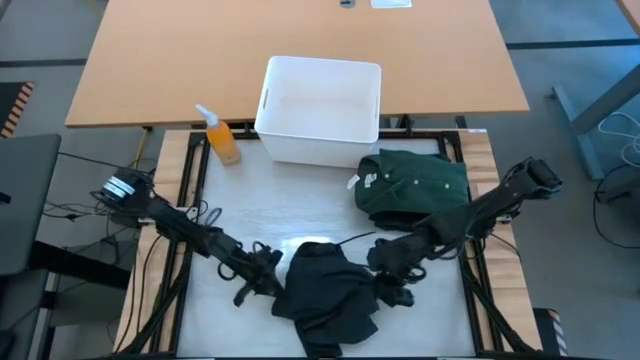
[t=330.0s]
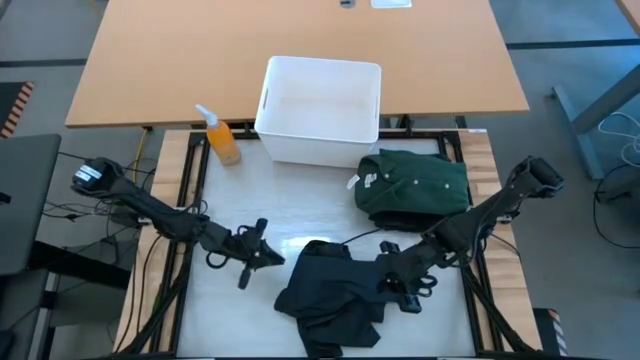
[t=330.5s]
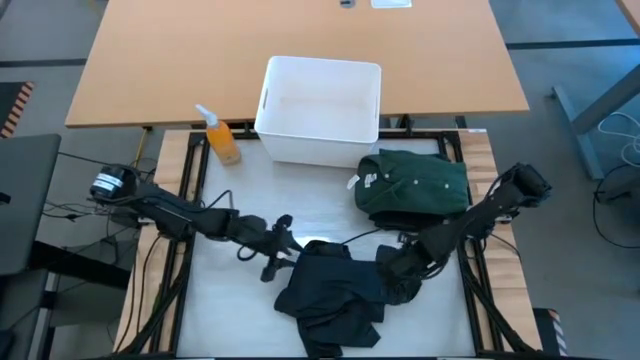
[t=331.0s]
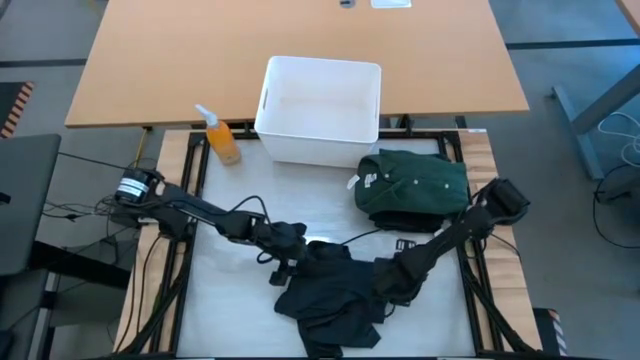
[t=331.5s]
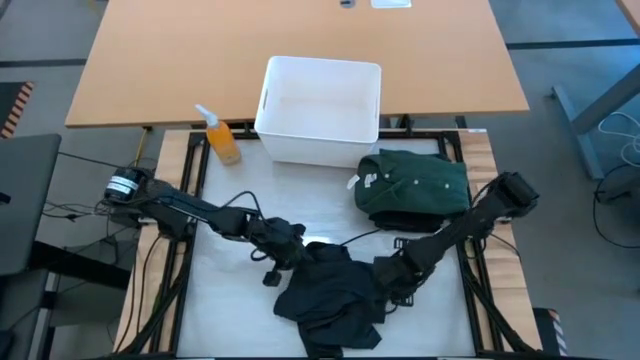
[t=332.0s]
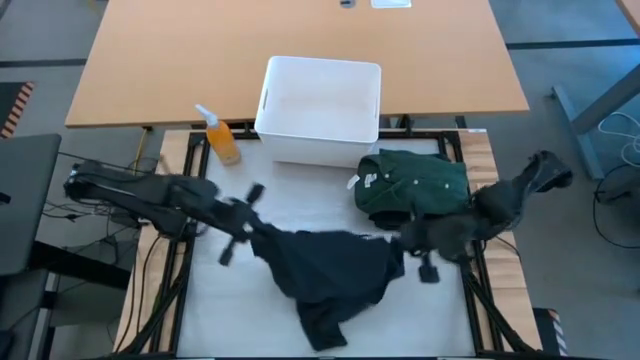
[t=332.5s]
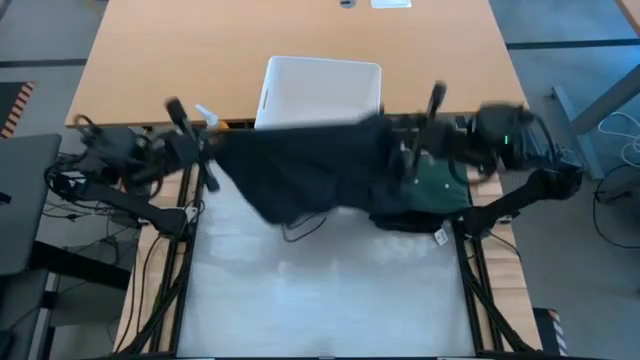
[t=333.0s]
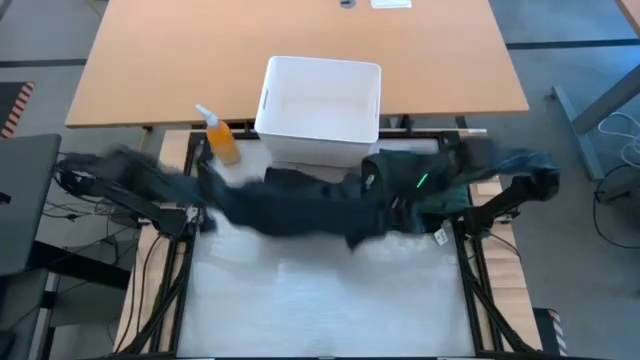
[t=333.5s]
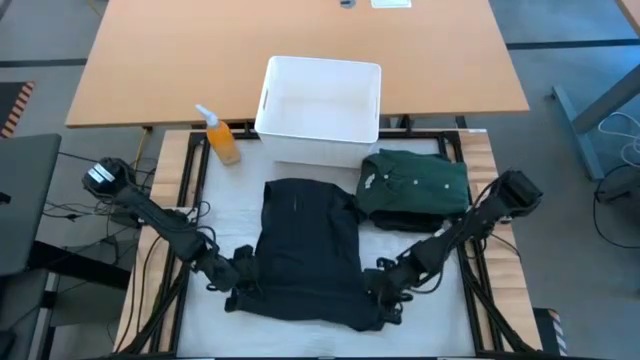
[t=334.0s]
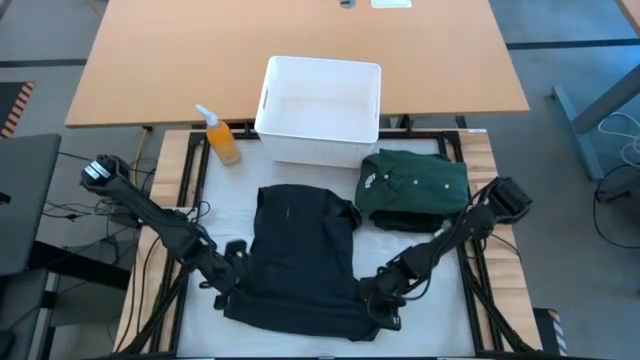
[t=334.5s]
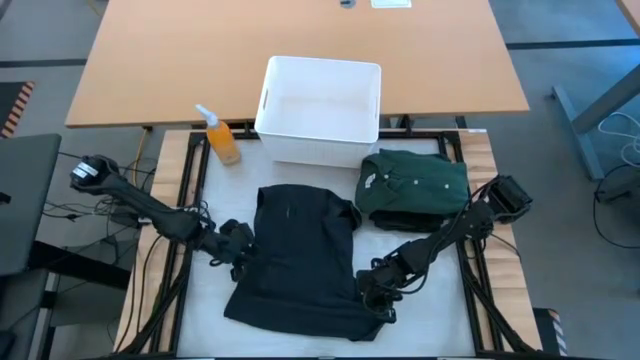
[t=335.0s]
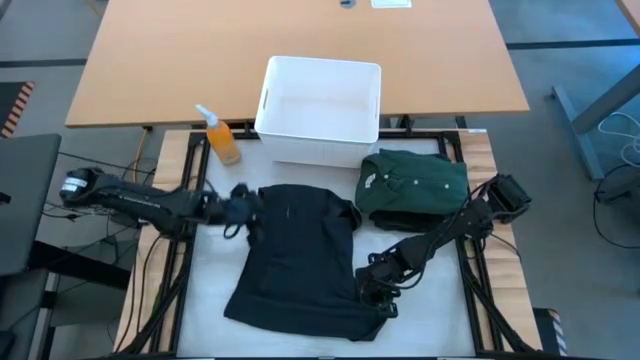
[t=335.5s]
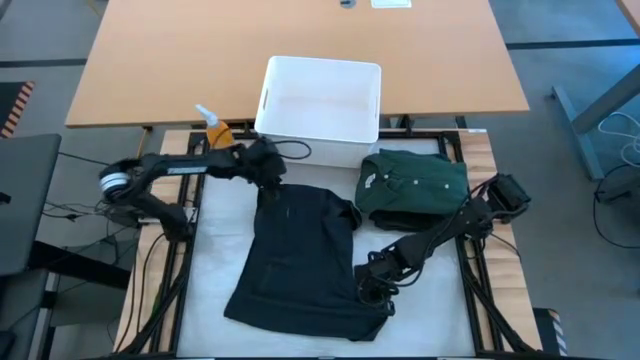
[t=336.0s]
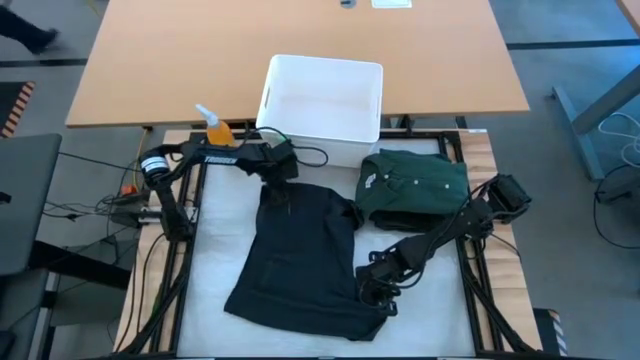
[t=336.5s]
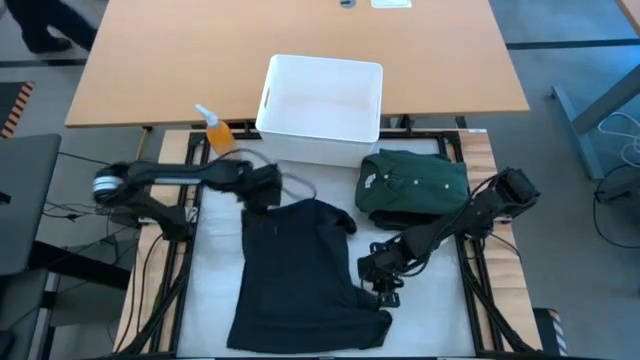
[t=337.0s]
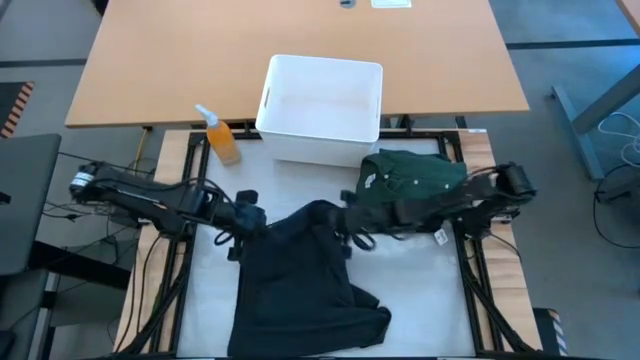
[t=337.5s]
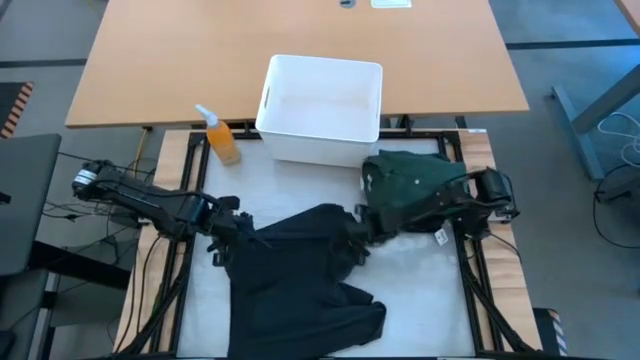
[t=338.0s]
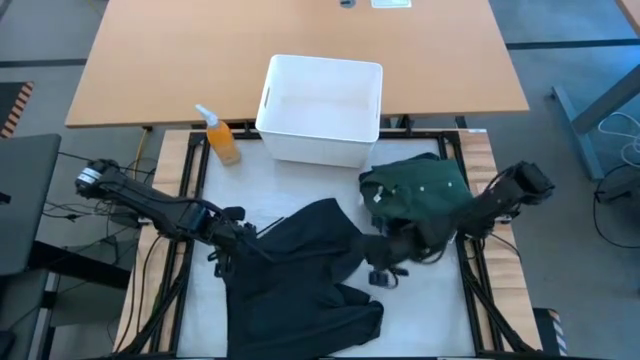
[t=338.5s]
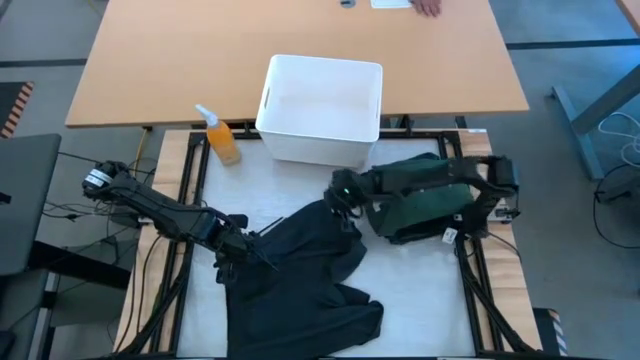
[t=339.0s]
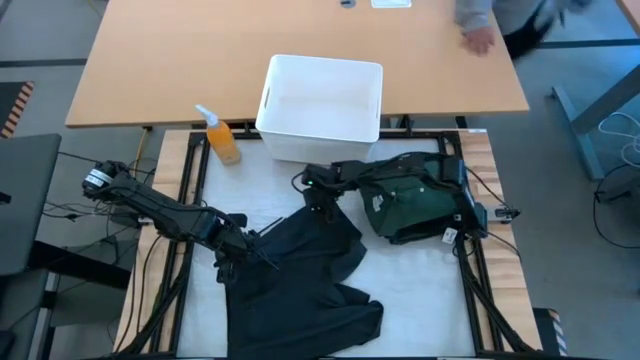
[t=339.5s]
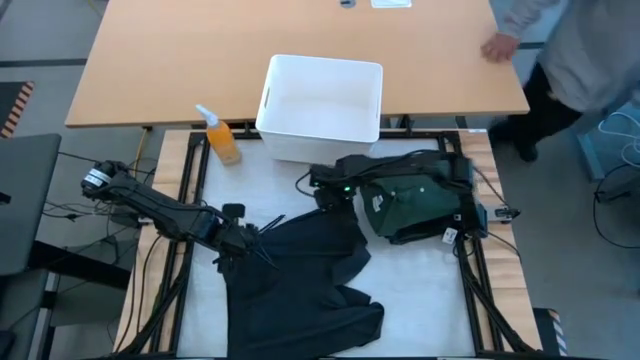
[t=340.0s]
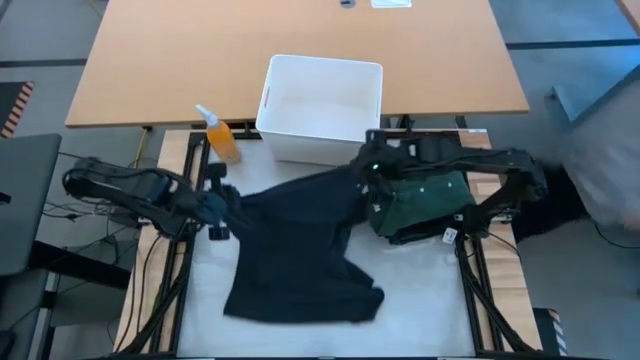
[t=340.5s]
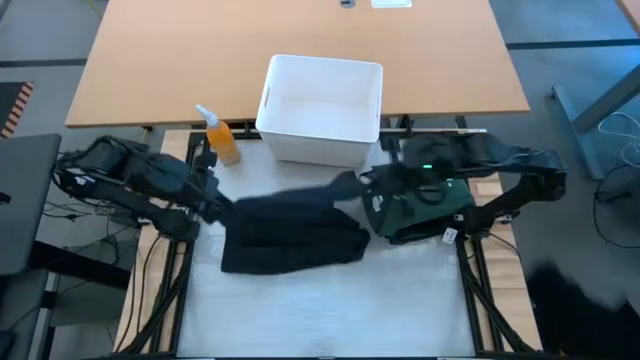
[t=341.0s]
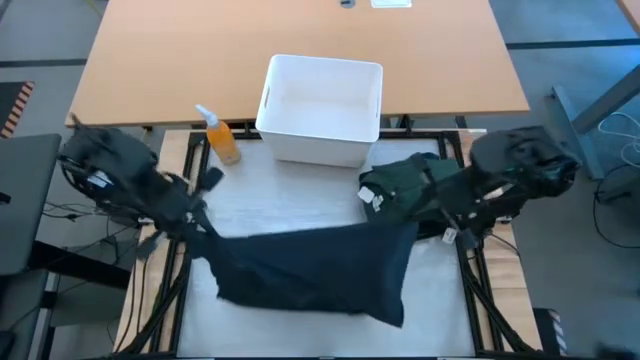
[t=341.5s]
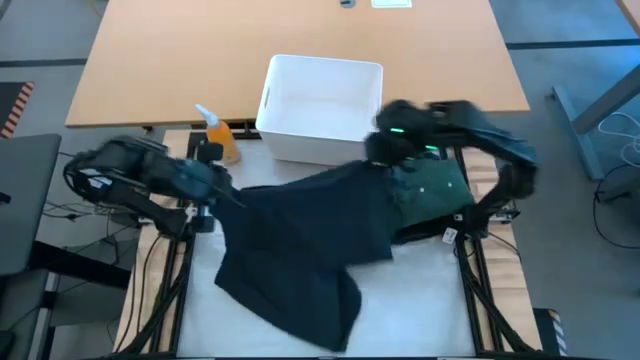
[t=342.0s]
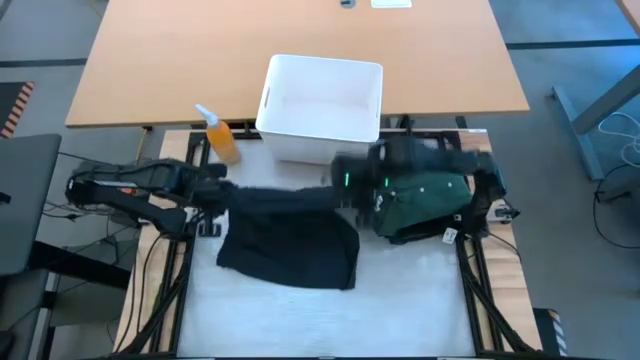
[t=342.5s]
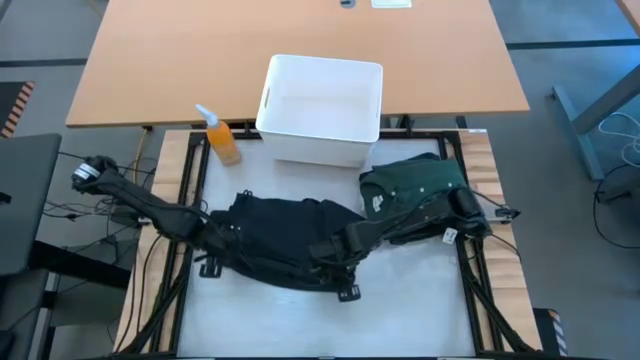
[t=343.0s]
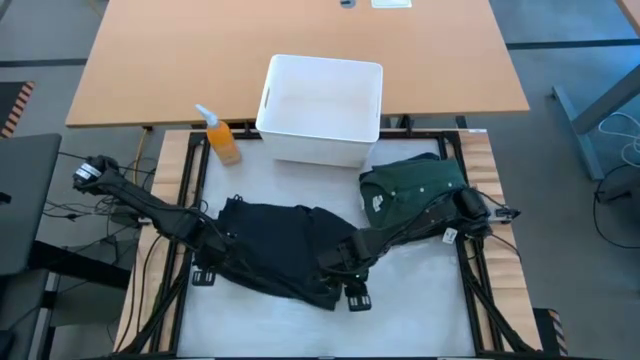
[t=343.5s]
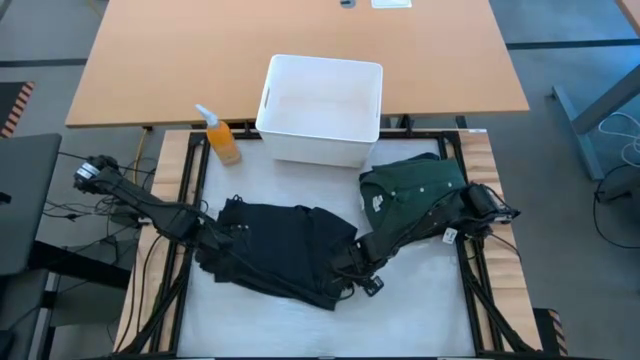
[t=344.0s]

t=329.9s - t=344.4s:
Task: Fold laundry
Fold the black shorts

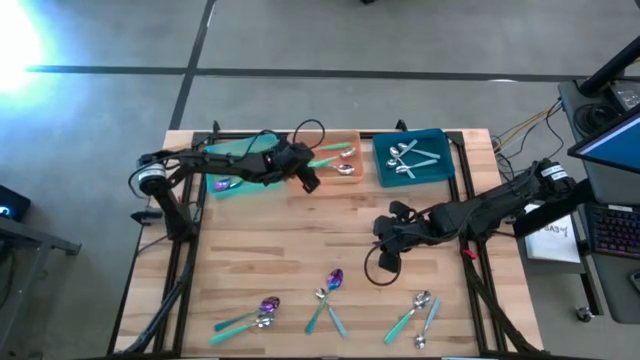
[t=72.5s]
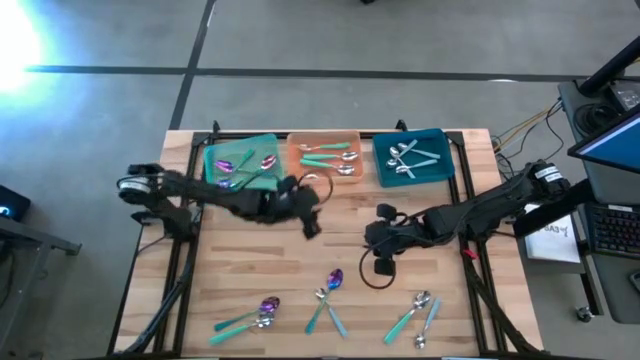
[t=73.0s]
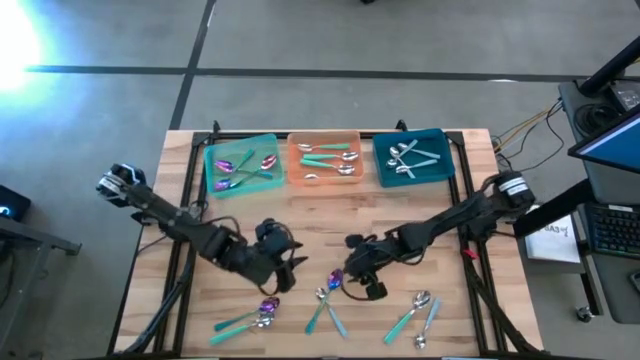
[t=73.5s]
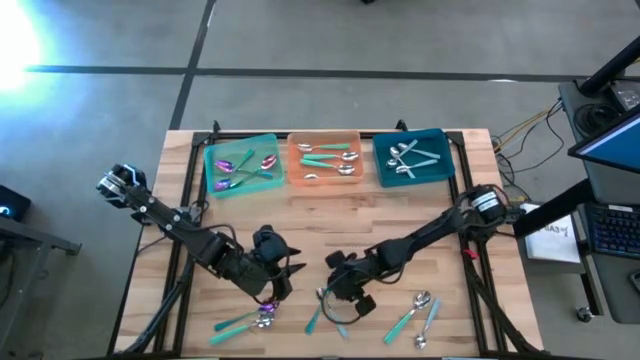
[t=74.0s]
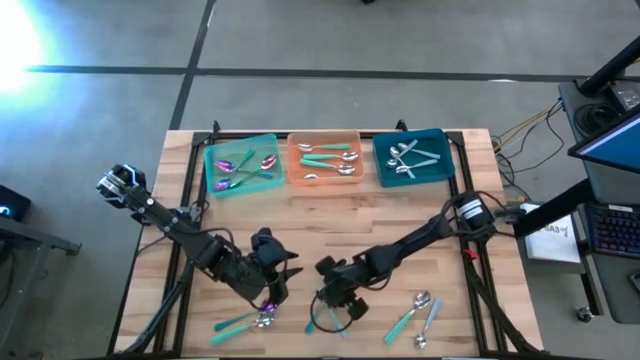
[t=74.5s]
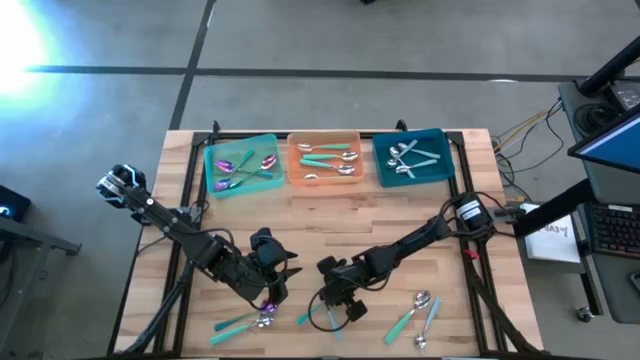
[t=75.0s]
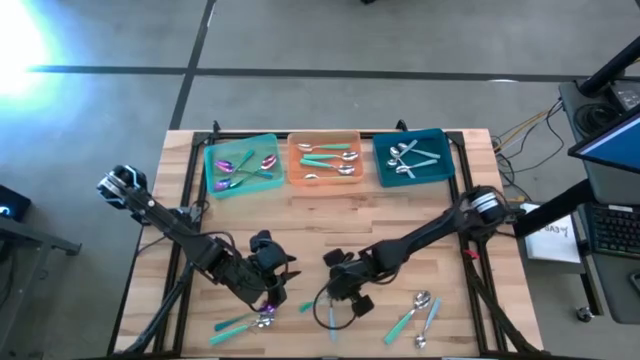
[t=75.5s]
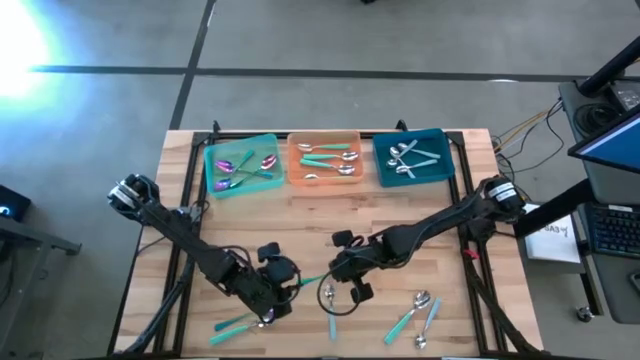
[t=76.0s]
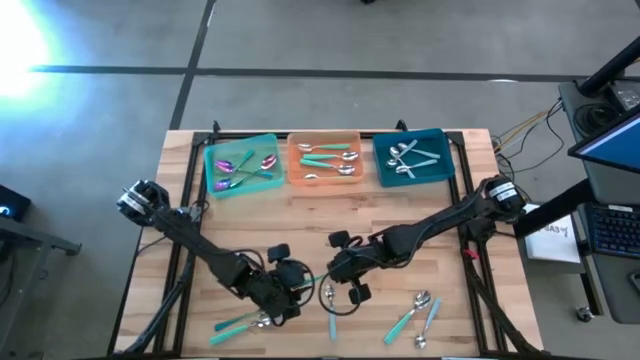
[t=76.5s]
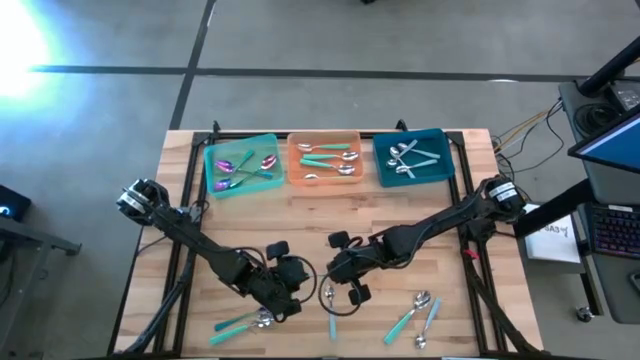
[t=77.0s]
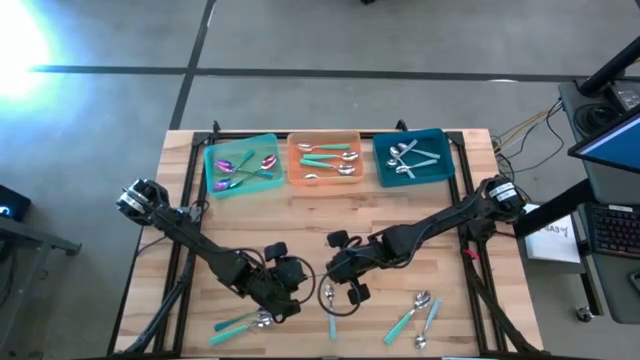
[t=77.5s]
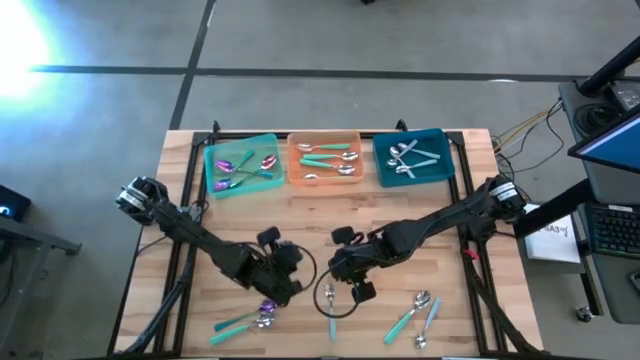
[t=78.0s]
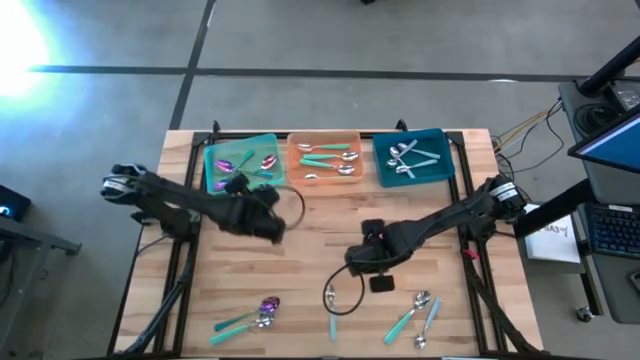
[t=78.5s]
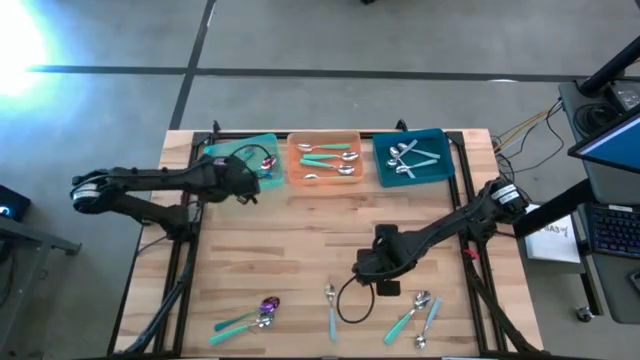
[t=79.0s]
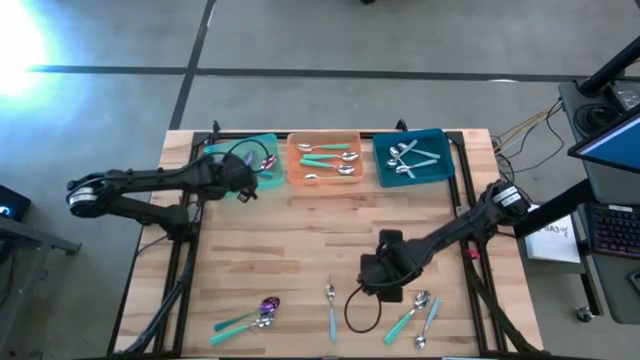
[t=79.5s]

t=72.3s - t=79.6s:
Task: Sort silverware by color (type)
Put the blue spoon into the green bin
